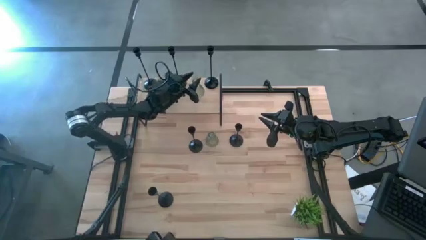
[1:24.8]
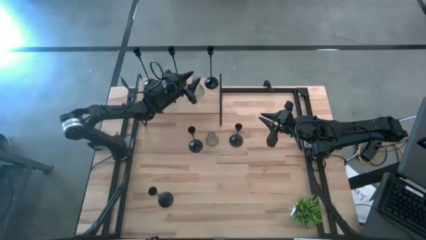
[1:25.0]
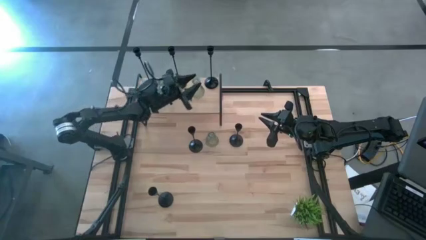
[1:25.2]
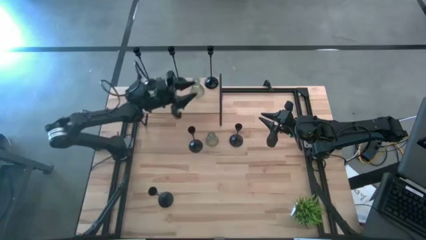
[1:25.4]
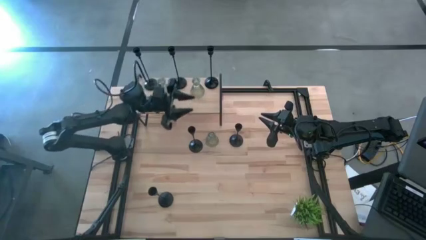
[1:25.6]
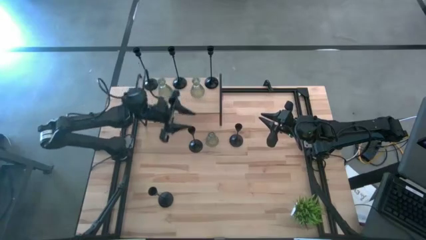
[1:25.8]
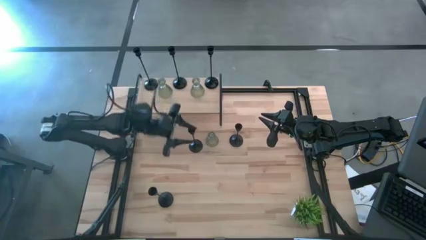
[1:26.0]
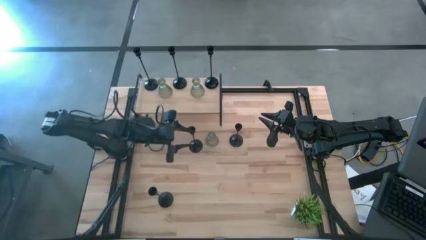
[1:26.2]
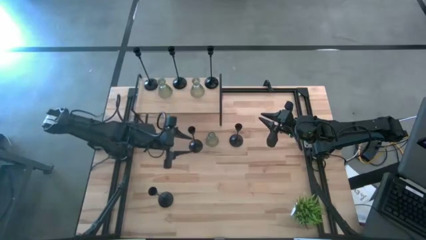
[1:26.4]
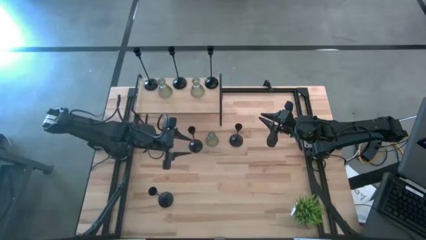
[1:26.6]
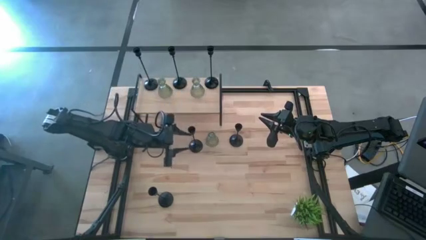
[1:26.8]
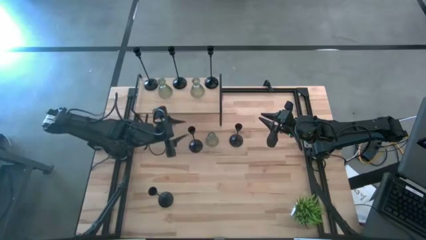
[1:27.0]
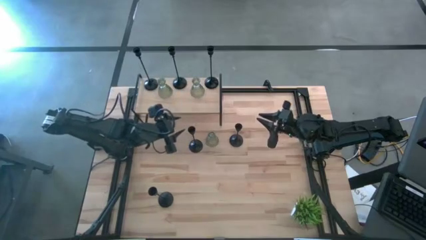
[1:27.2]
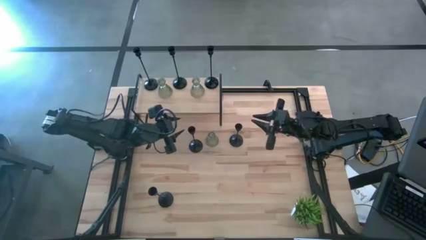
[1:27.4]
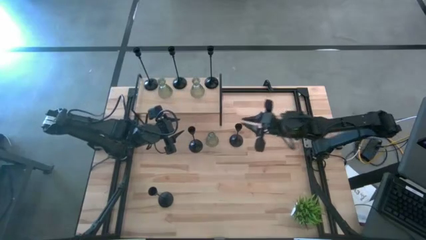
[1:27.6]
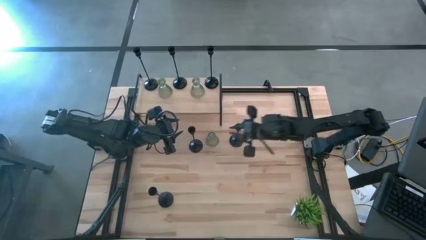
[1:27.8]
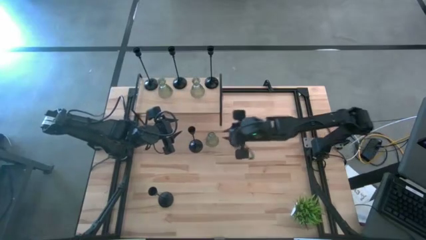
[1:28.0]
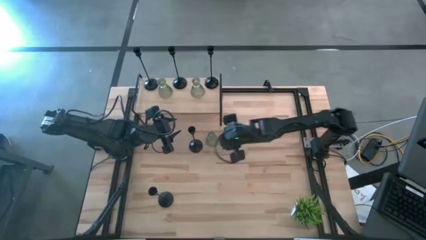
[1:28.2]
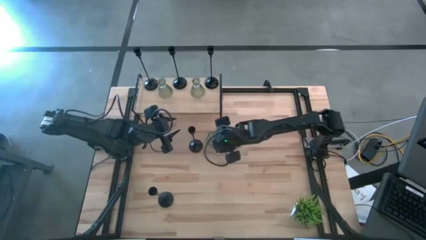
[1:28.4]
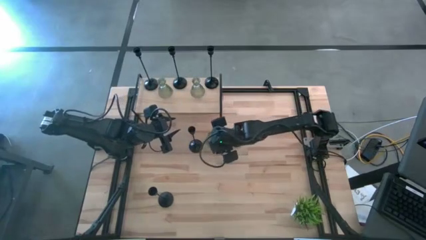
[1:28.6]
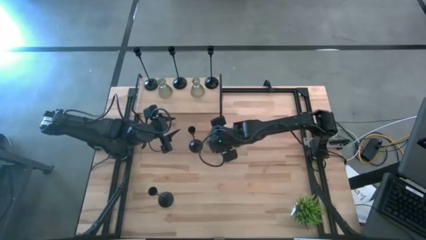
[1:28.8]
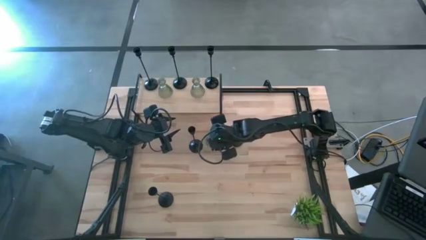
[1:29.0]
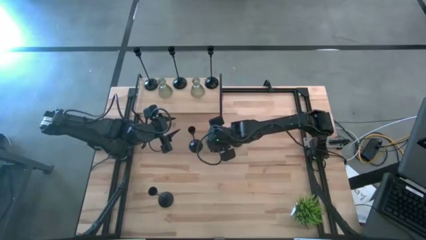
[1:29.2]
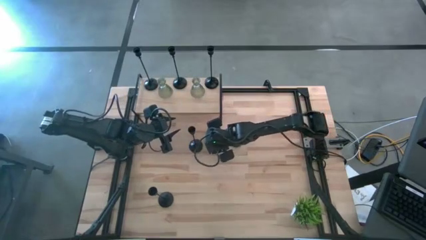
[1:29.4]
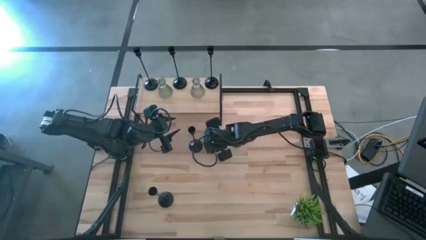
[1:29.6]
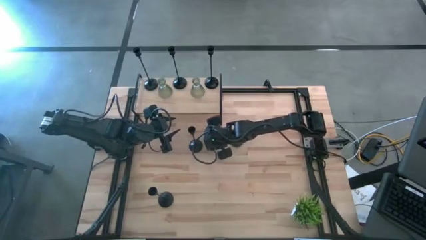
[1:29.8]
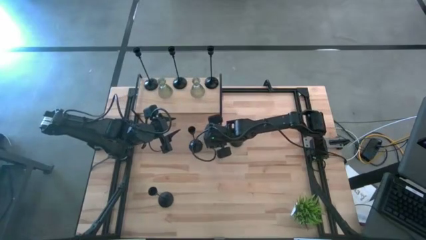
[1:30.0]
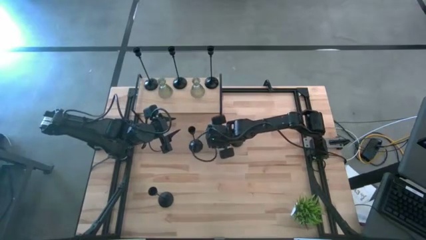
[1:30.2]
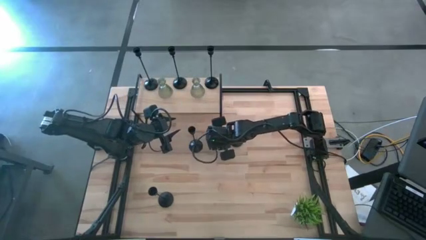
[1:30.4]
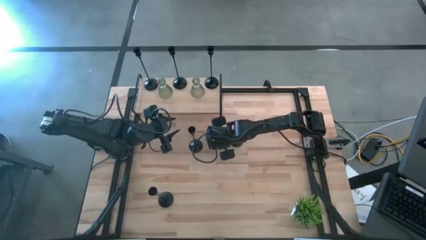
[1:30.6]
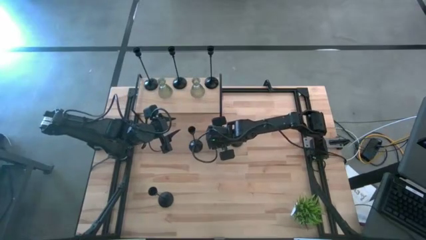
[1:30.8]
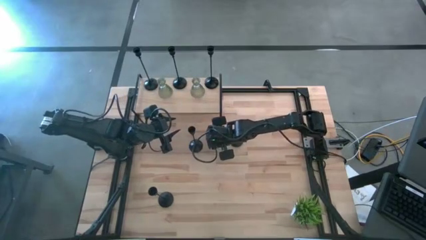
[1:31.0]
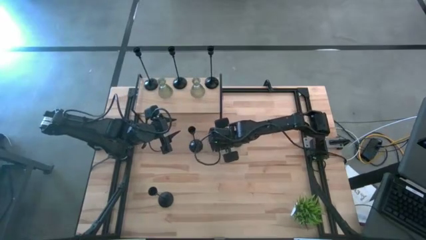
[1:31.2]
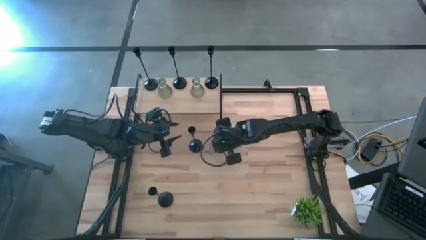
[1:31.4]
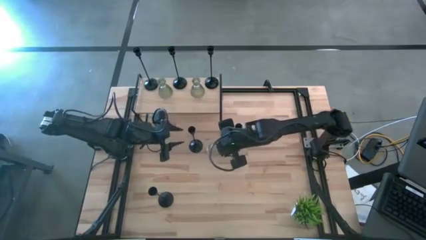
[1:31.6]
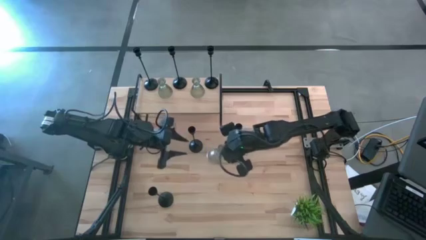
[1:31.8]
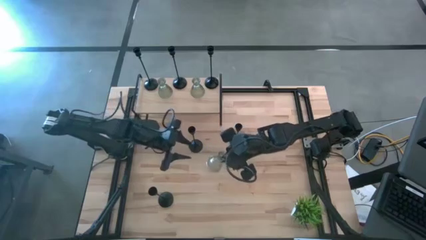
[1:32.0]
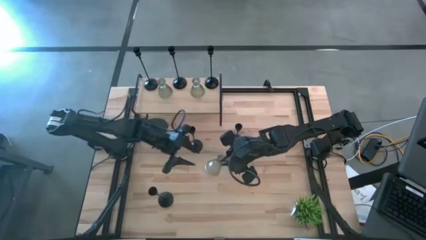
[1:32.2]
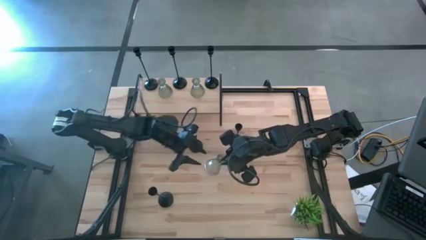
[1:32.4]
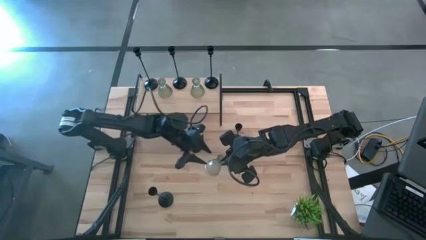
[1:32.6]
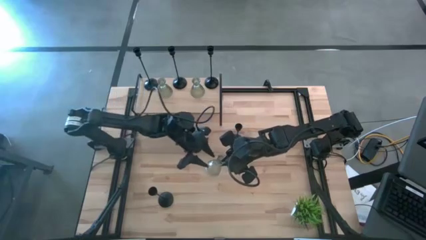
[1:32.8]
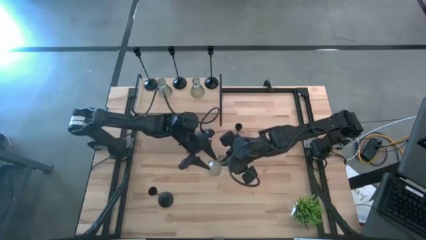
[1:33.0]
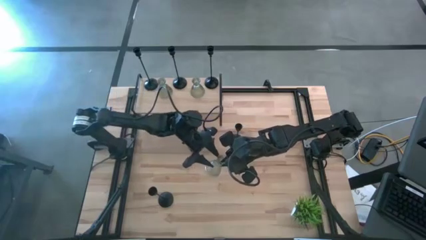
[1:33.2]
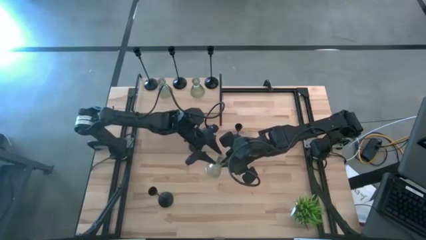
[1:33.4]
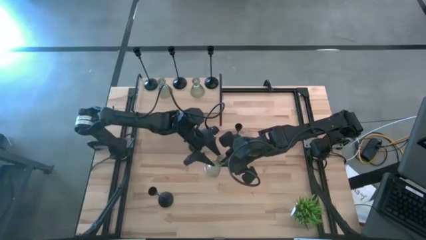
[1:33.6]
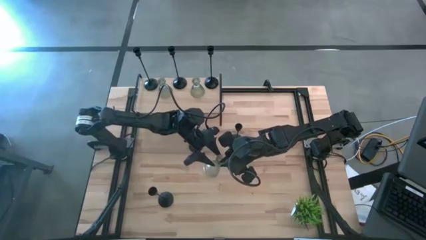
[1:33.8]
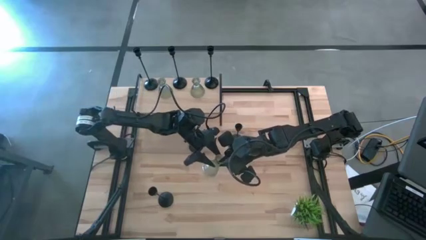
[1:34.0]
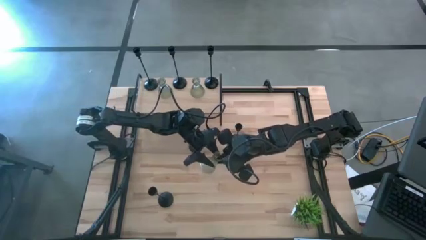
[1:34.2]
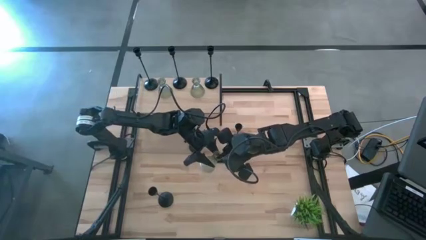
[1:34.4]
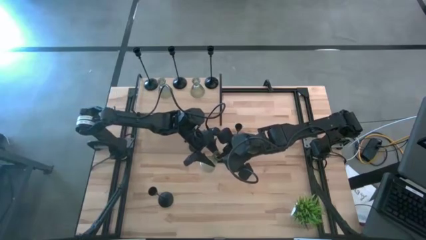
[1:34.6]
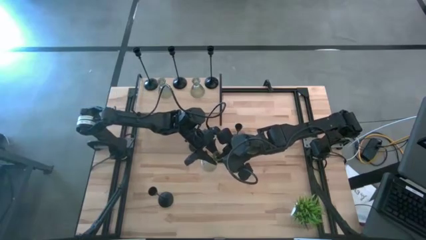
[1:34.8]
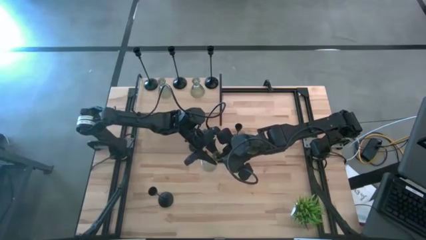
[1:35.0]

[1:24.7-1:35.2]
Task: Pick & Place candle stick holders
Put the green glass candle holder on the shelf

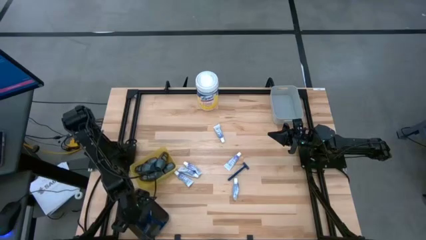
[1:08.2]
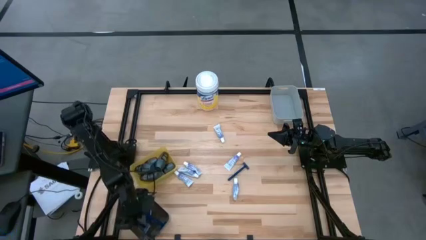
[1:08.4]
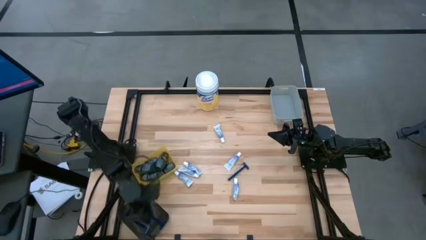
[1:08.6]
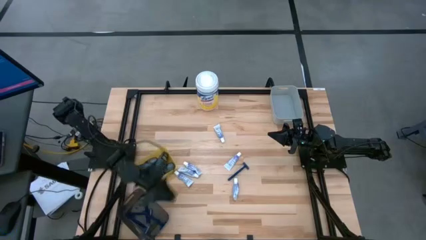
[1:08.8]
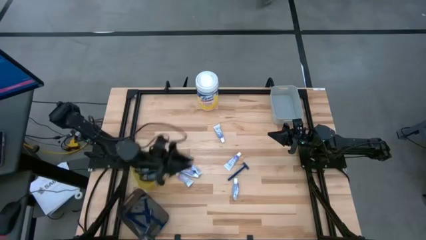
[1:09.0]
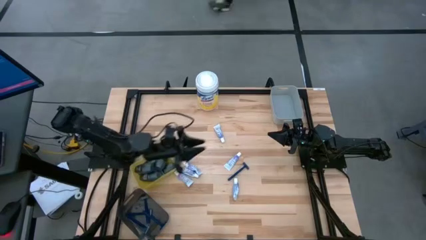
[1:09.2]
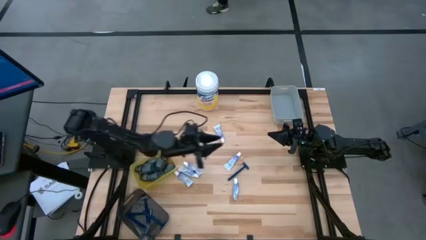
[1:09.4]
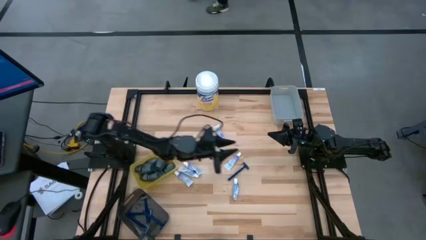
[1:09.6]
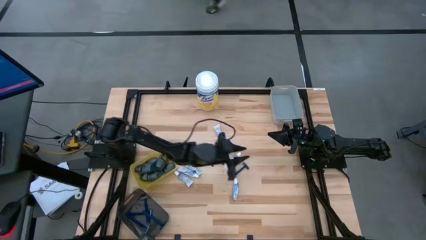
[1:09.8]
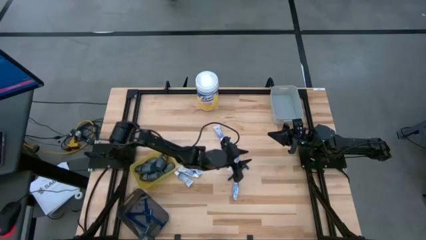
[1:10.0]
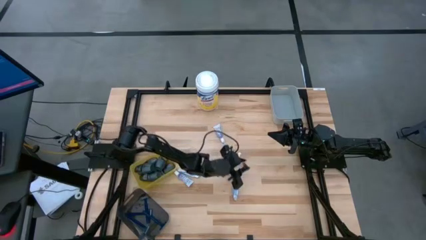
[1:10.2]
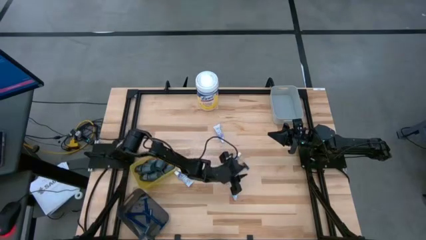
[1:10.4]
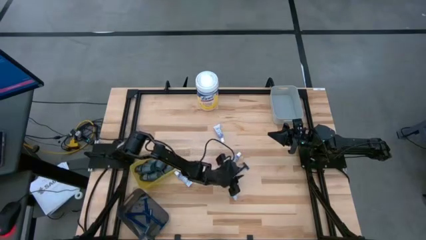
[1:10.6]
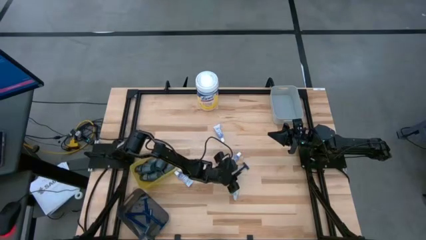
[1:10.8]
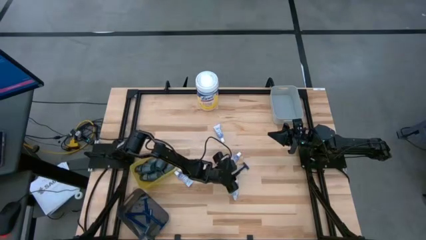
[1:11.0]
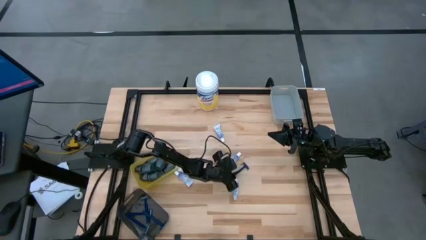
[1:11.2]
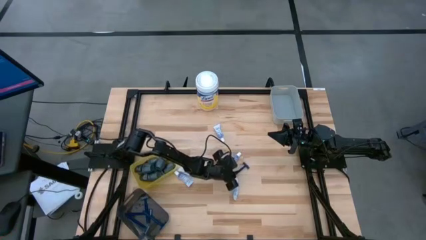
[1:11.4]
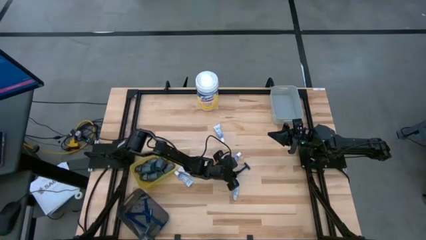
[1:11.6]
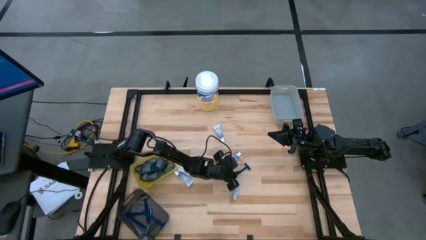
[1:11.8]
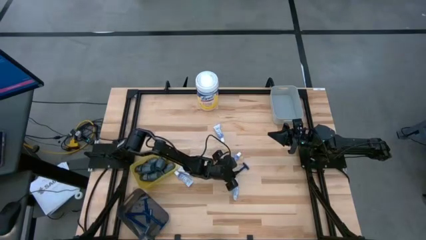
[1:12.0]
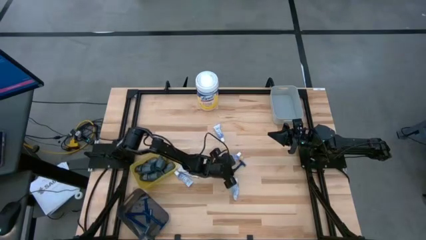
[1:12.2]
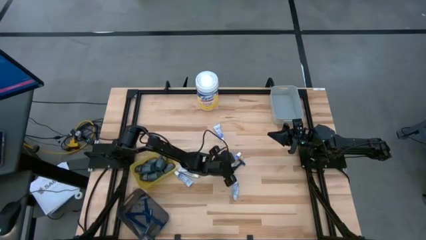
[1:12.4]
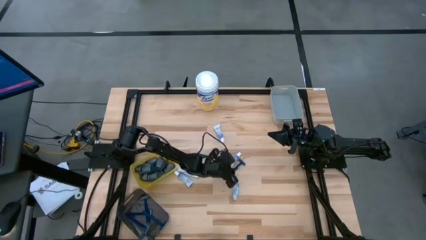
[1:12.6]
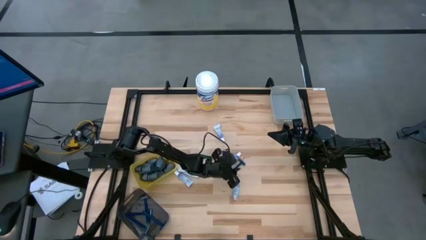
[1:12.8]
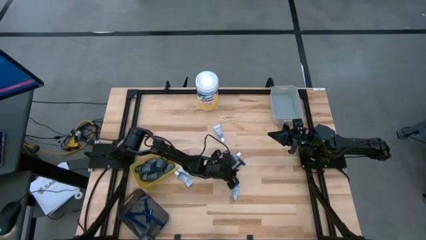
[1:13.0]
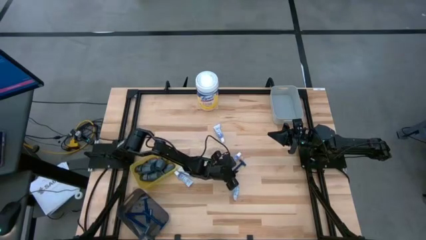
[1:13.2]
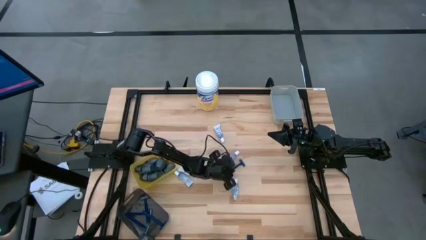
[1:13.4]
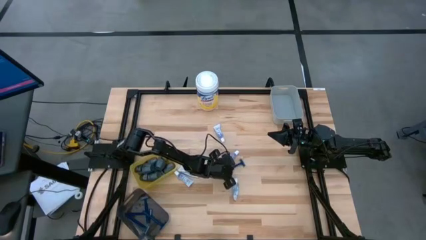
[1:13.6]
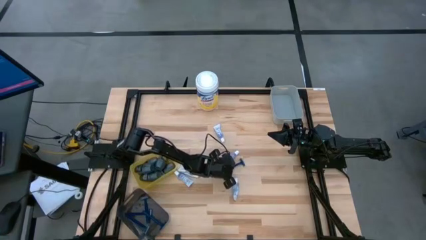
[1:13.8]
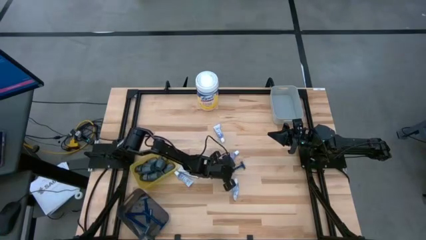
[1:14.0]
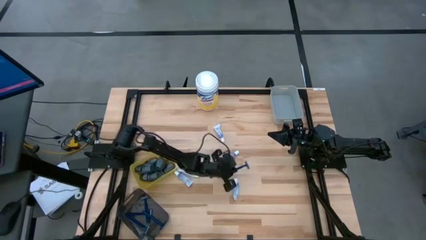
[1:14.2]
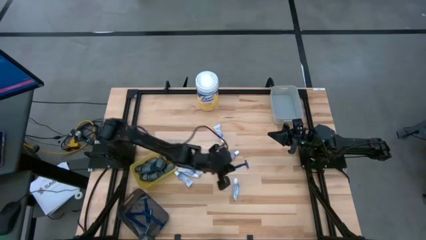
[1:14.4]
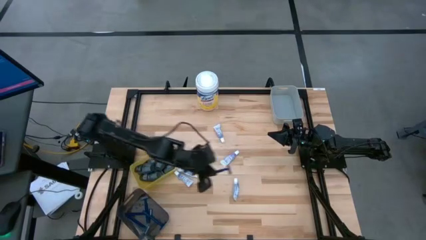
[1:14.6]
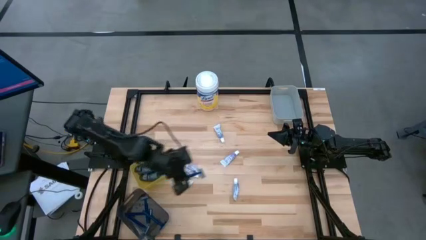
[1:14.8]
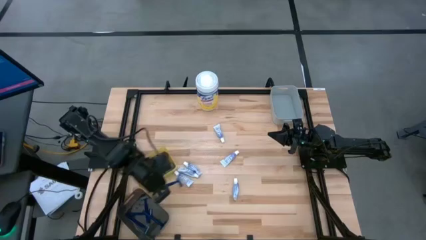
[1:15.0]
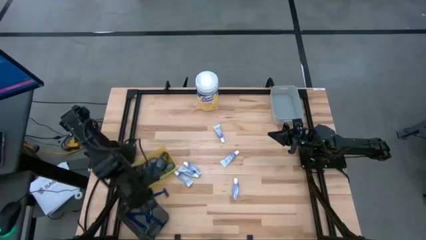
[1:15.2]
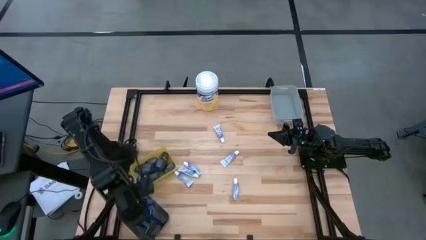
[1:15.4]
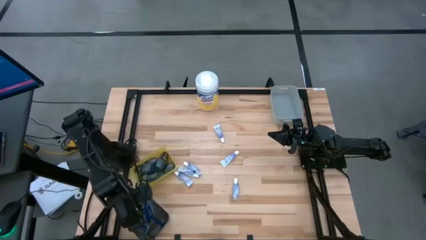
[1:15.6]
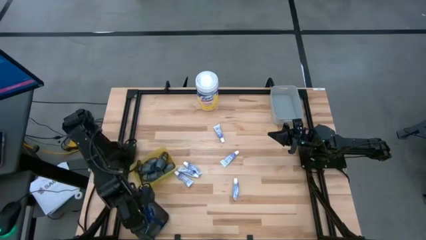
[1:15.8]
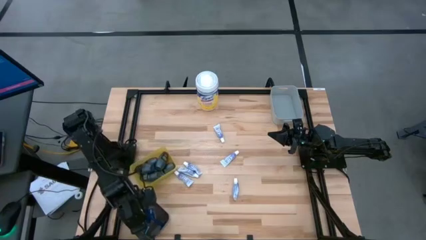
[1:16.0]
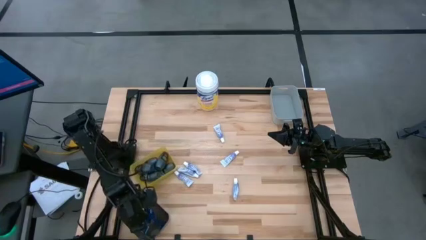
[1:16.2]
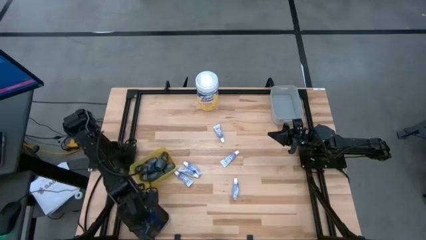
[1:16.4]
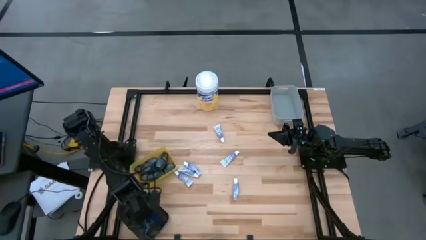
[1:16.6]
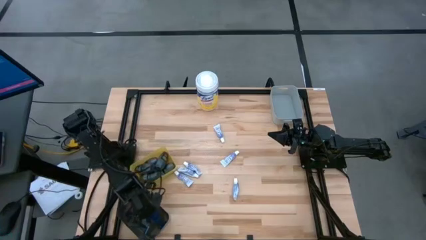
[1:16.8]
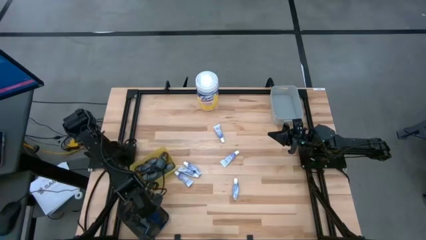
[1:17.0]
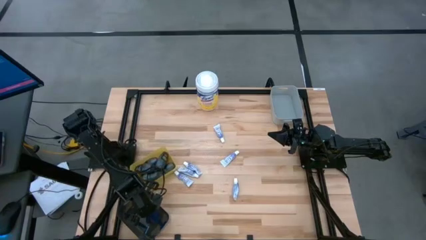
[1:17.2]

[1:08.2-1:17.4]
Task: Pick & Place Travel size toiletries
Put the dark blue razor into the black bin
